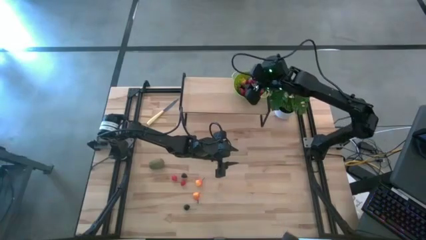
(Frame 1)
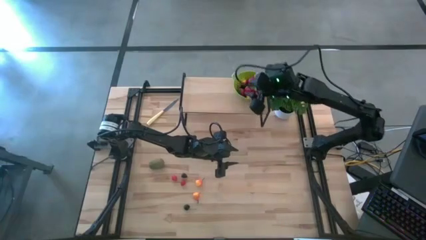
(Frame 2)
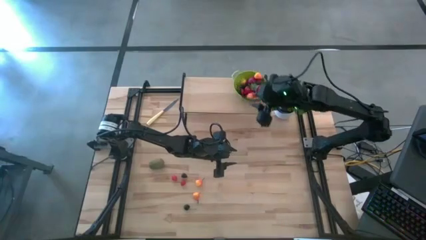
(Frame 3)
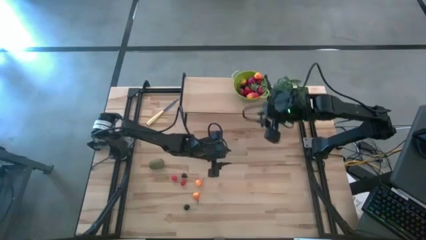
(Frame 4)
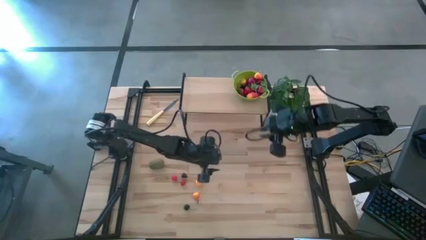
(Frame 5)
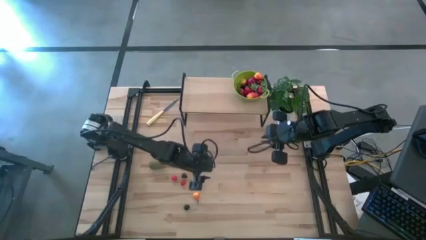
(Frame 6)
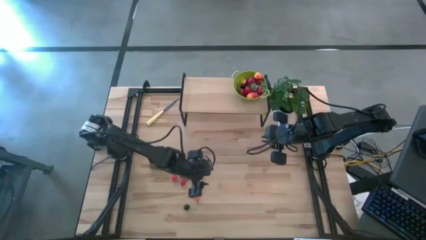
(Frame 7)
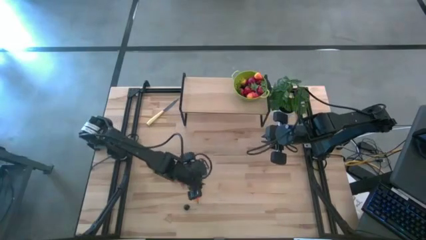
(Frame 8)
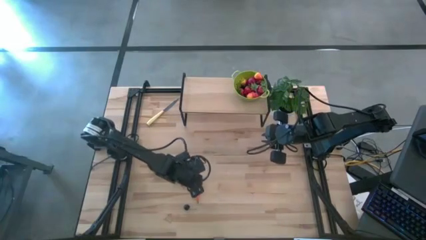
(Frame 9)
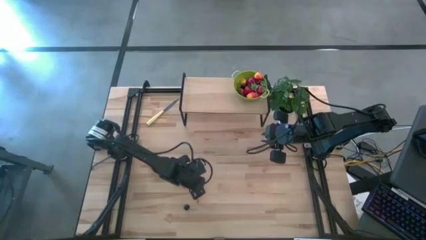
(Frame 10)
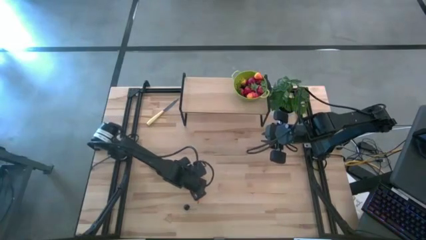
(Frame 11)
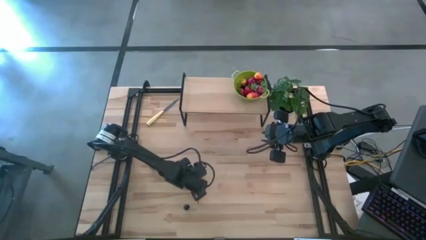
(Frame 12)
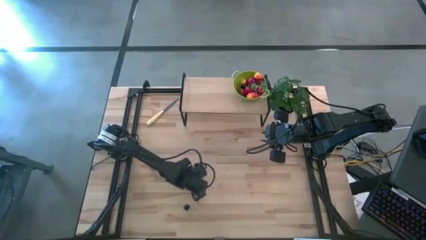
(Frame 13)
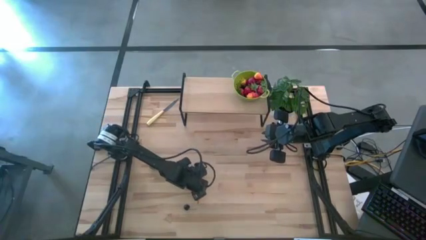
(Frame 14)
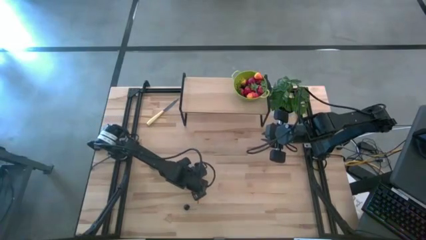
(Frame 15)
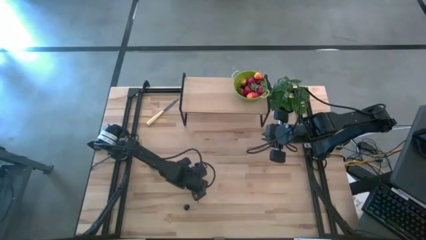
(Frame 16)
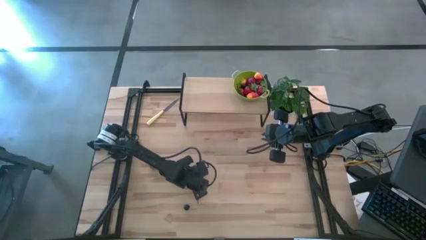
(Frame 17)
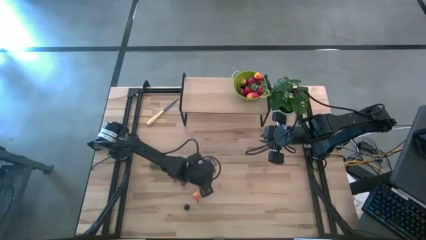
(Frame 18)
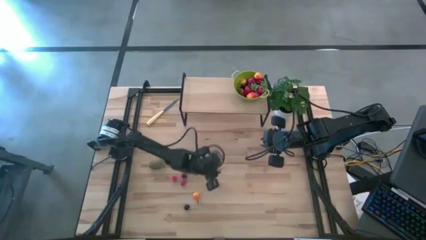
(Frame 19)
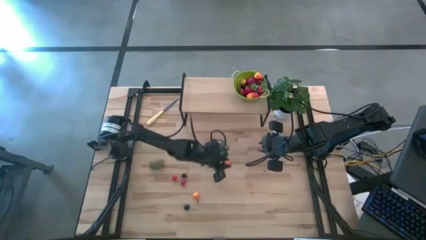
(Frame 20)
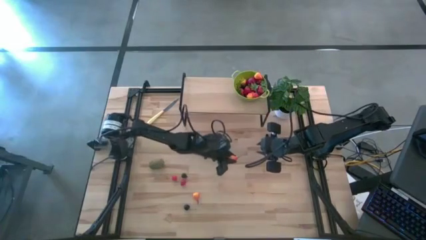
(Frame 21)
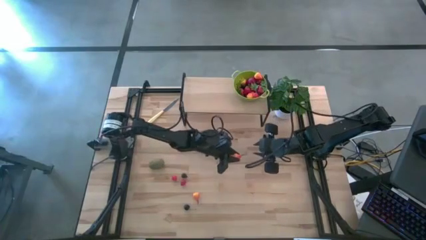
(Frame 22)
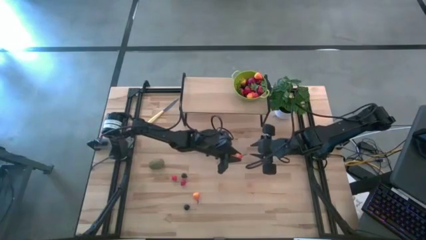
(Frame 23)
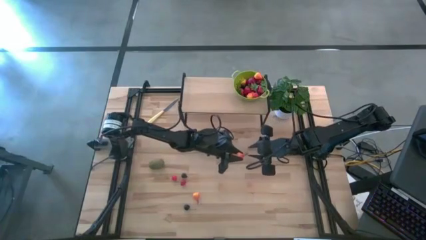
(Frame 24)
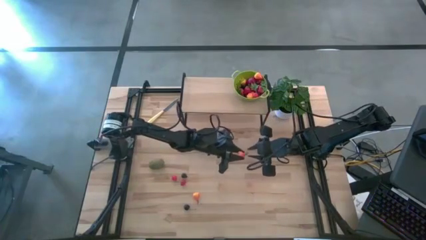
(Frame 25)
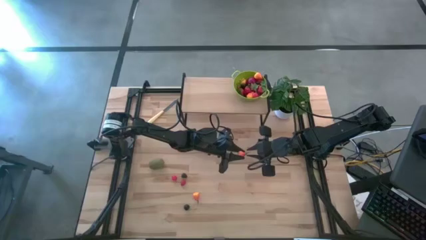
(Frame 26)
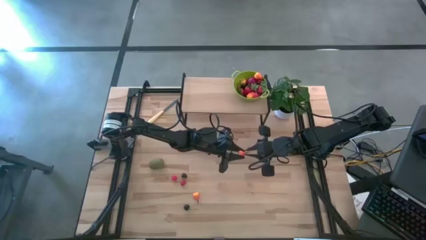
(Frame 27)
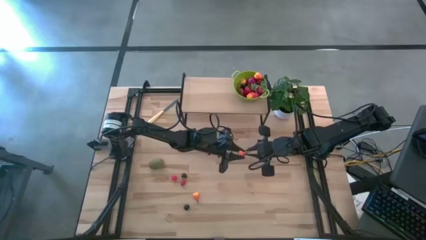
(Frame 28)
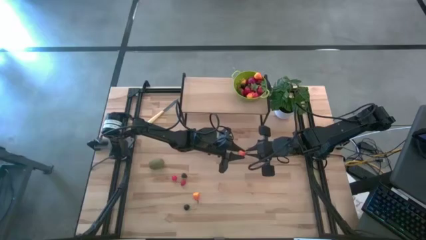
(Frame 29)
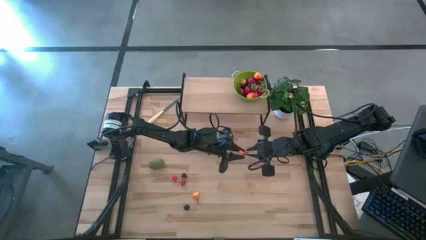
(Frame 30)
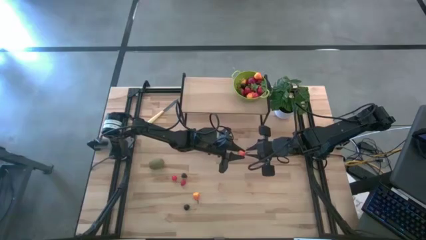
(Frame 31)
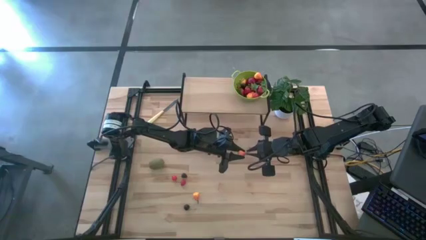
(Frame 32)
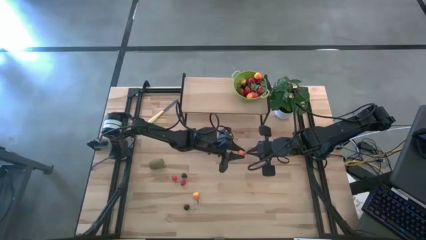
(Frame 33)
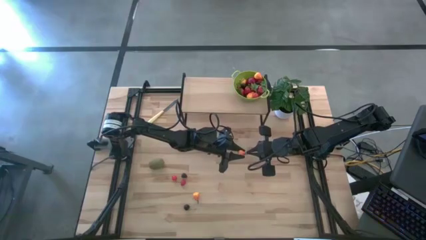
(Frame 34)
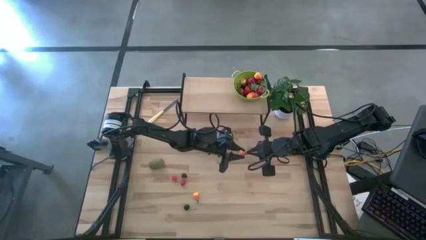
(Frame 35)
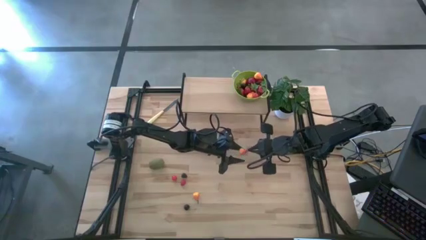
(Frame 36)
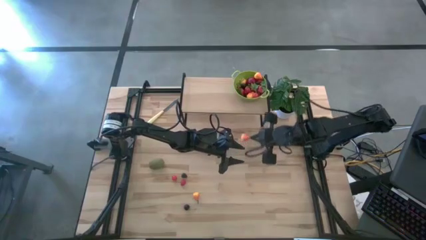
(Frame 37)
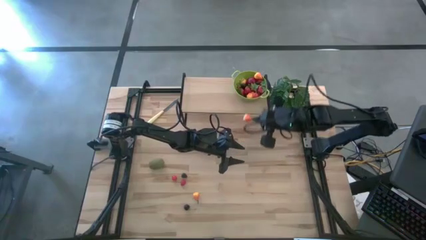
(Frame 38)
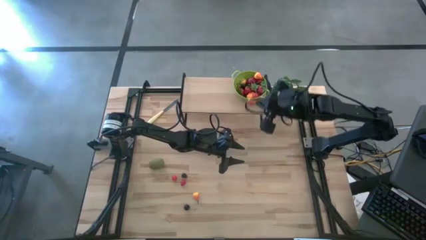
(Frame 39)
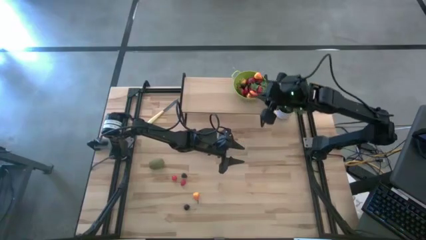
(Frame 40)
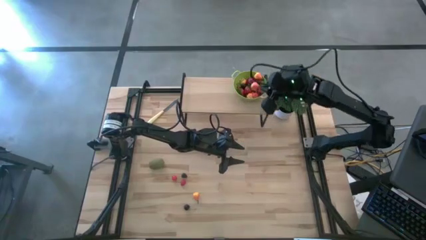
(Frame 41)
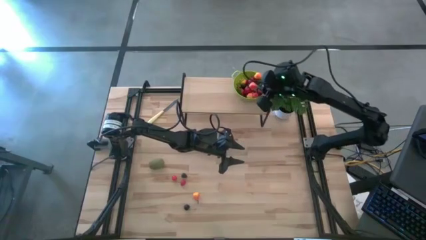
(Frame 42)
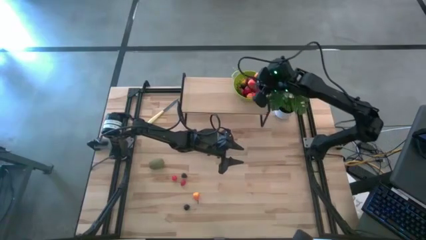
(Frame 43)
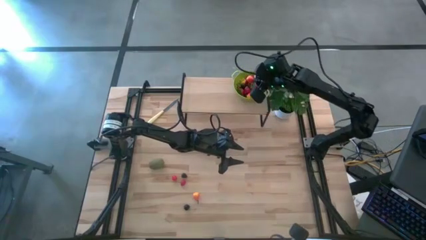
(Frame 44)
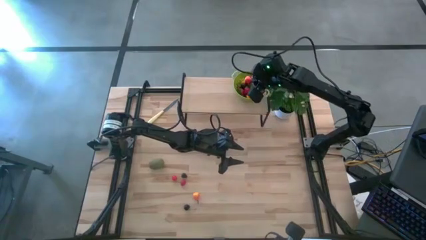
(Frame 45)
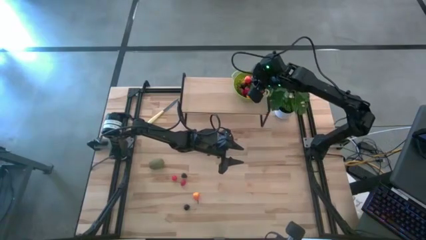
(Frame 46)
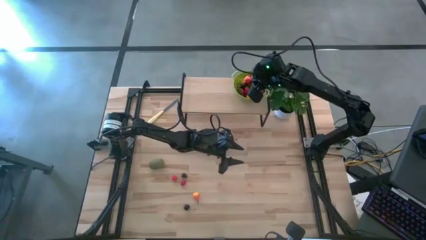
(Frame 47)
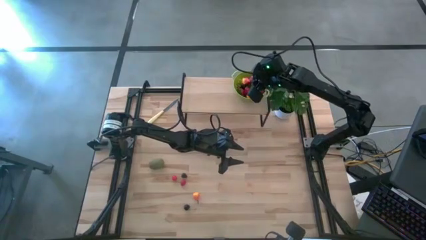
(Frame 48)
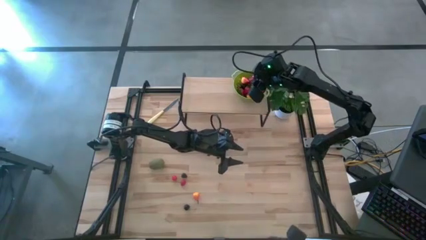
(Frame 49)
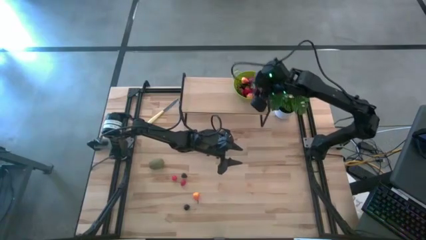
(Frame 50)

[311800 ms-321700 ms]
Task: Build produce basket
Put the pear into the green basket

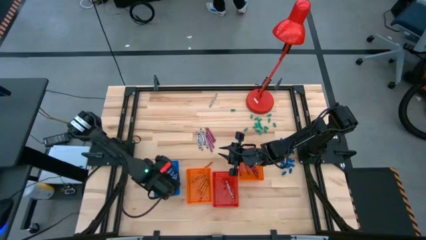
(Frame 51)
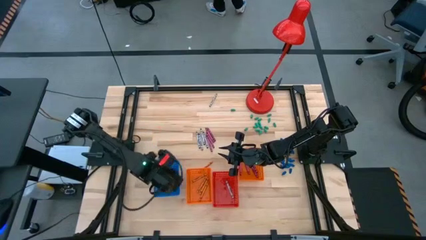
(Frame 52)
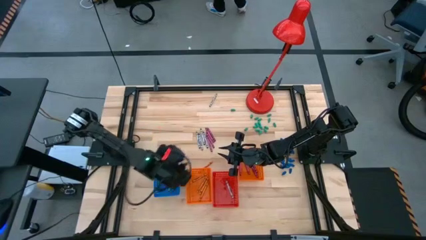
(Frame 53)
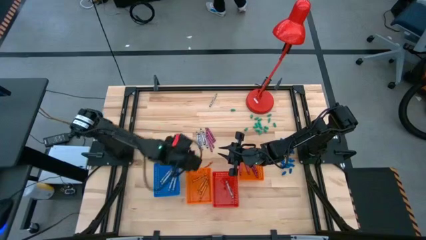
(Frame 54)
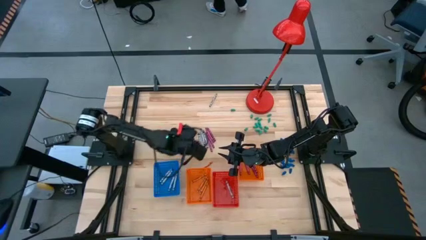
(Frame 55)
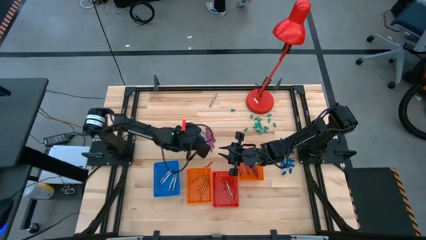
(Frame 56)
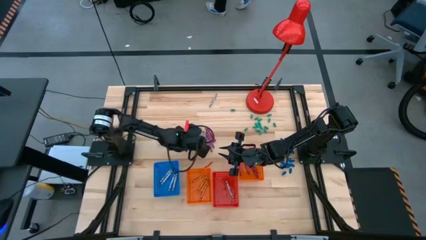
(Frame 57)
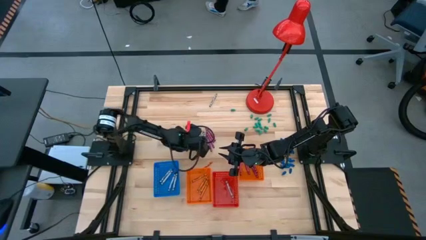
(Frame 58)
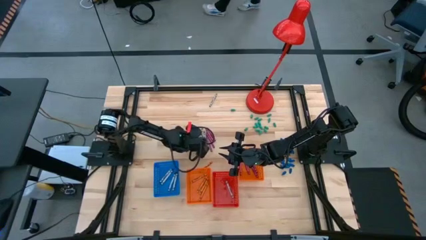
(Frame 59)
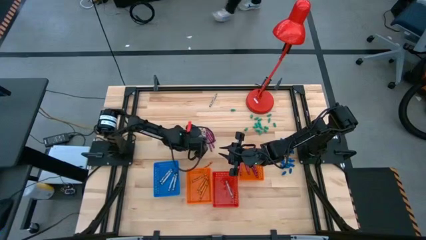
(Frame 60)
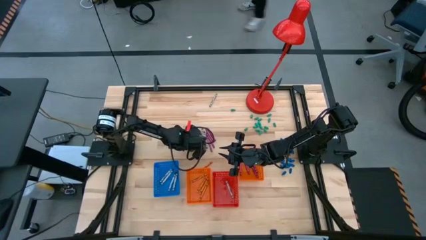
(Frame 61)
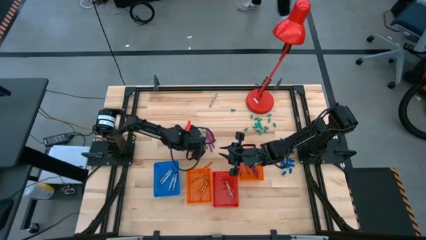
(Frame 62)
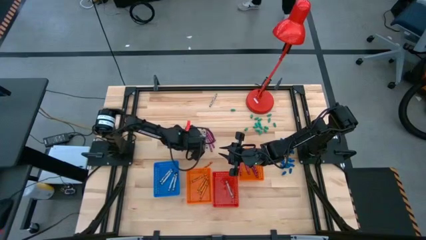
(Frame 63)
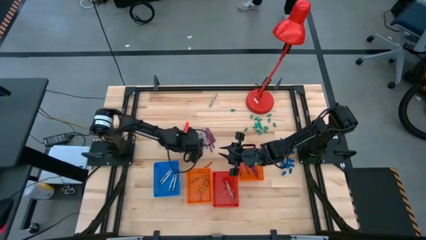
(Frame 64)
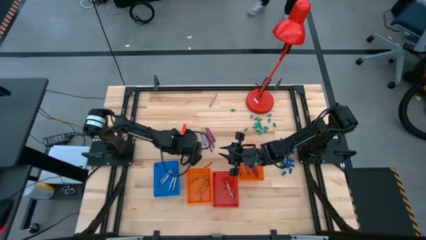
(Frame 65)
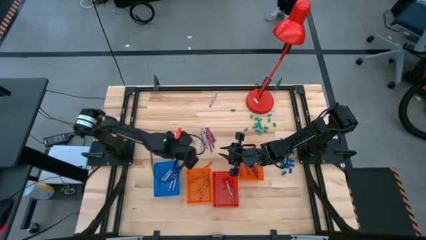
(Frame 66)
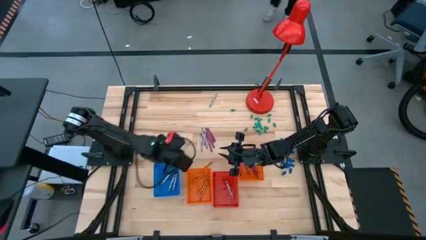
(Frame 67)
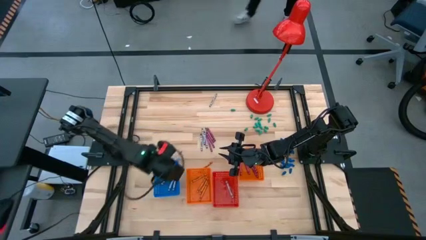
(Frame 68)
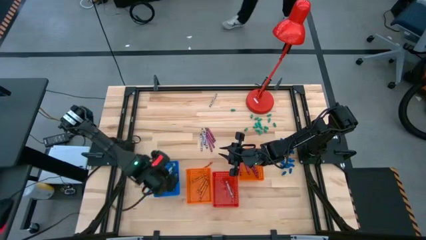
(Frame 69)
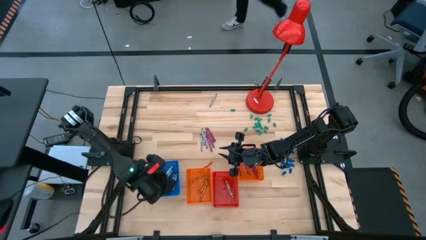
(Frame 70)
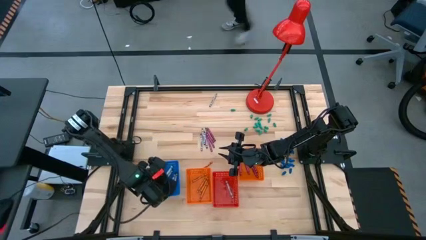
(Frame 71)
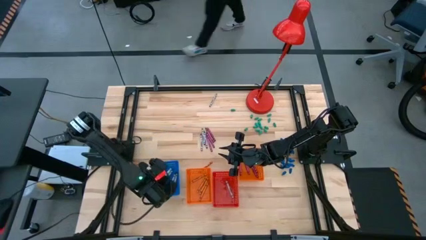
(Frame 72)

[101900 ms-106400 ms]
Task: Sort crayons
Put the black crayon into the blue bin
